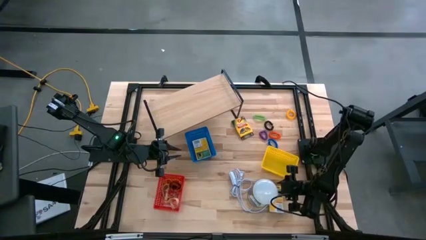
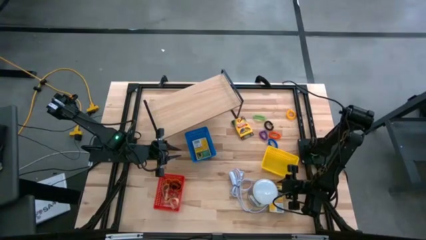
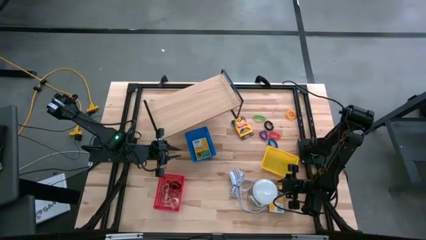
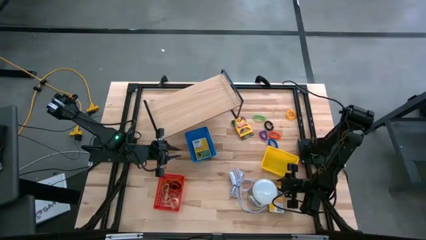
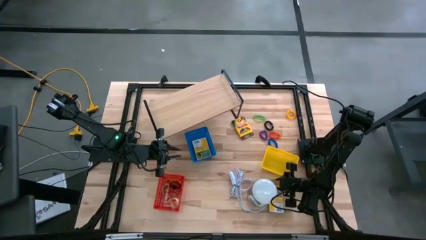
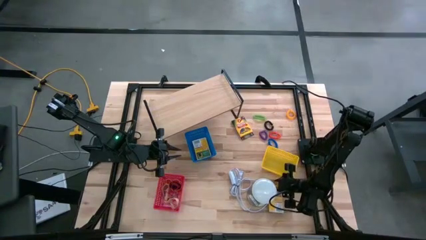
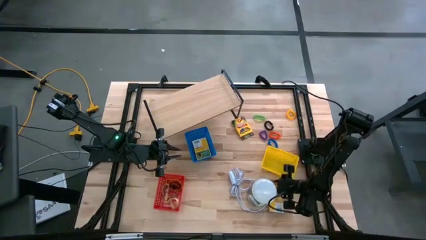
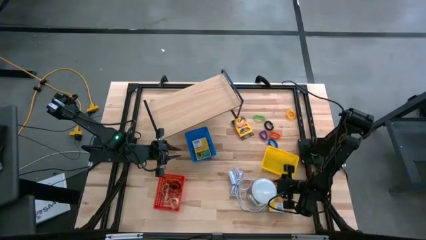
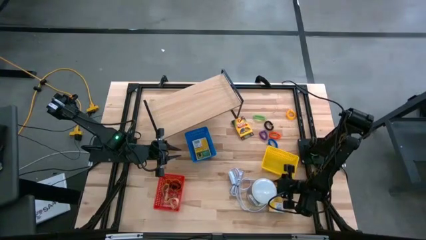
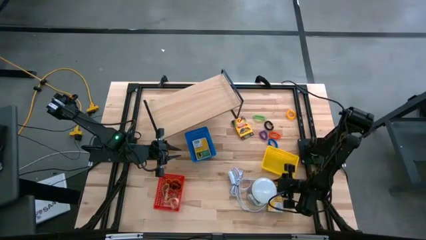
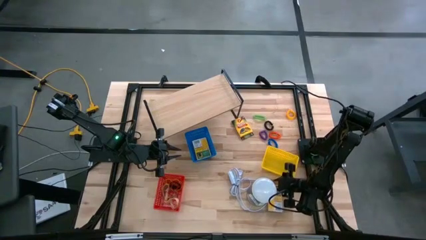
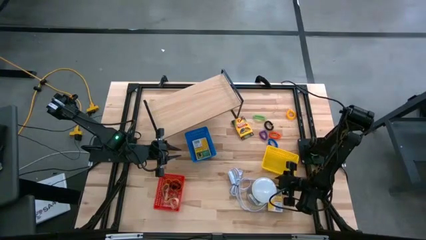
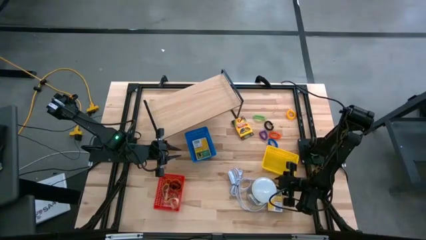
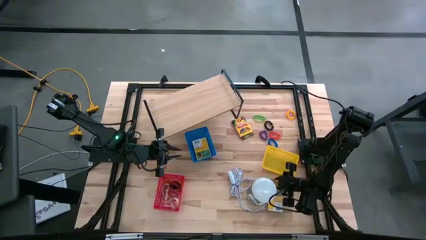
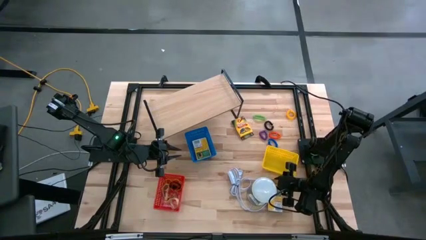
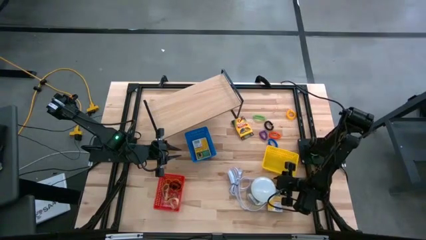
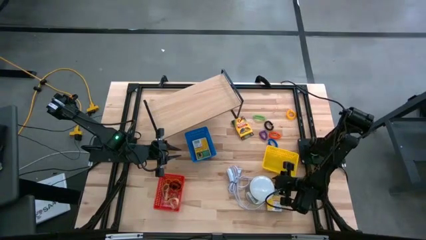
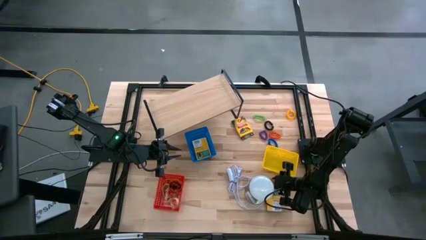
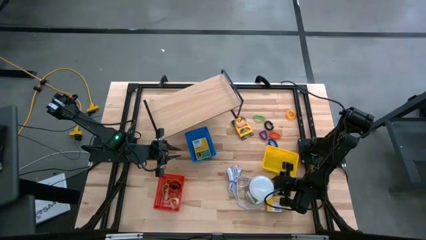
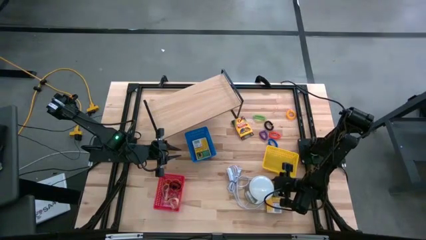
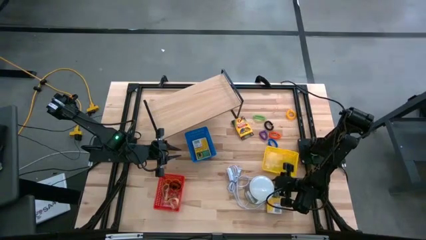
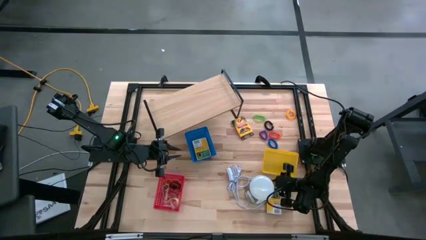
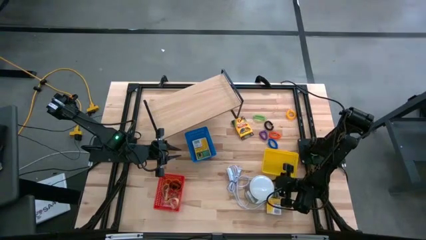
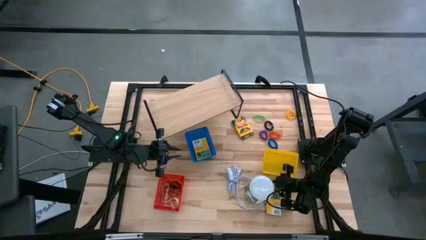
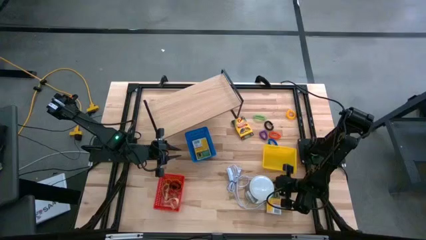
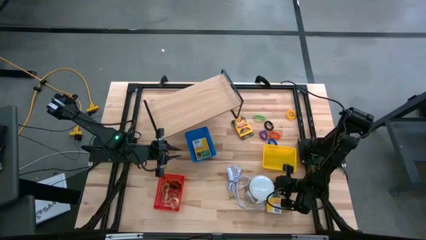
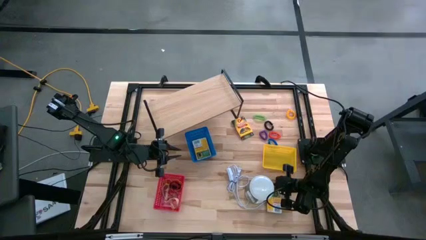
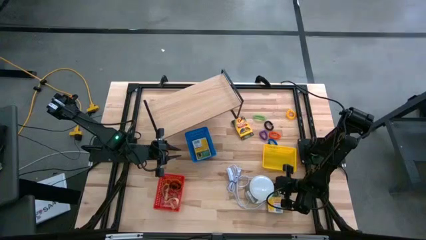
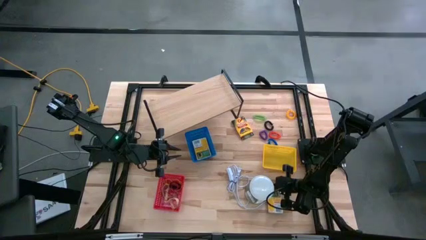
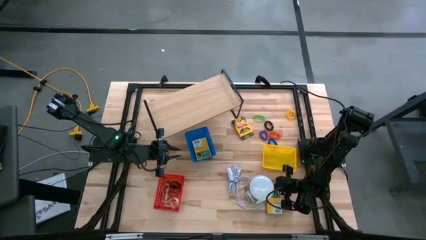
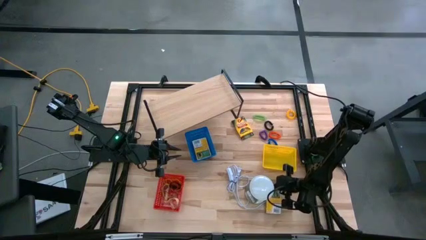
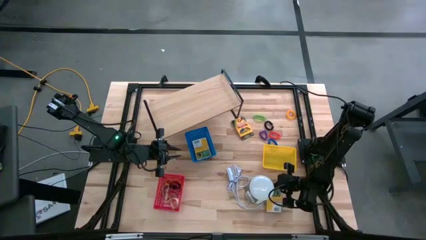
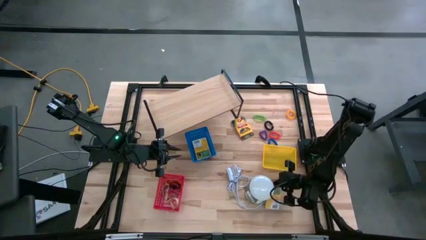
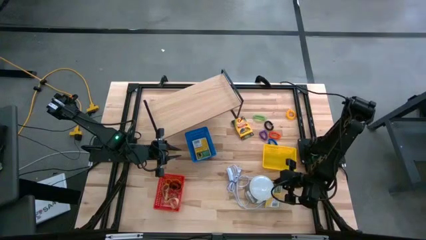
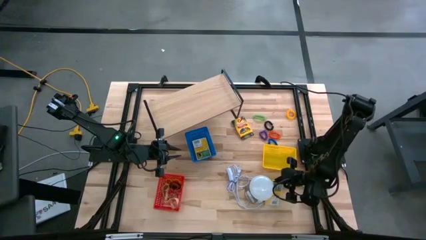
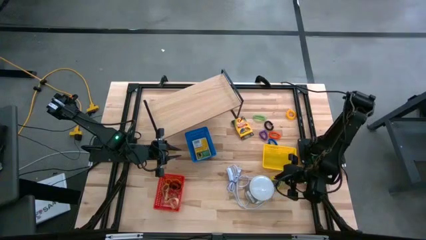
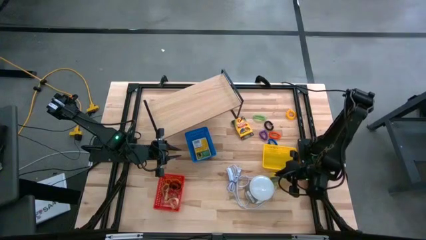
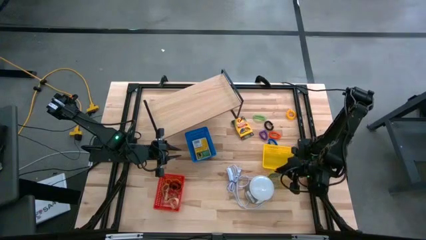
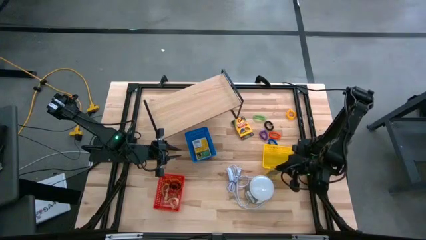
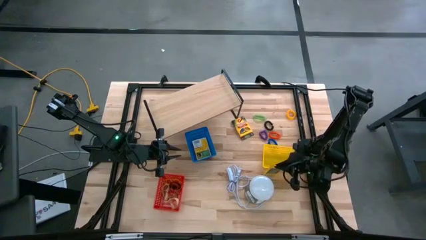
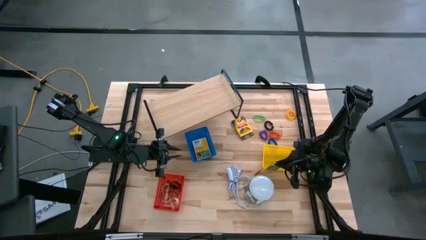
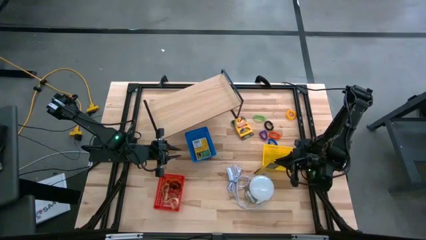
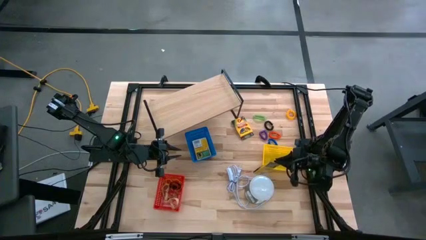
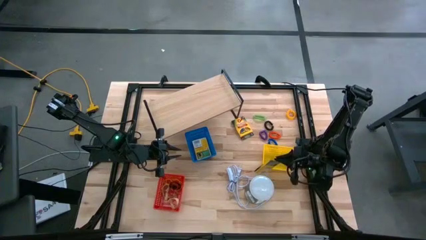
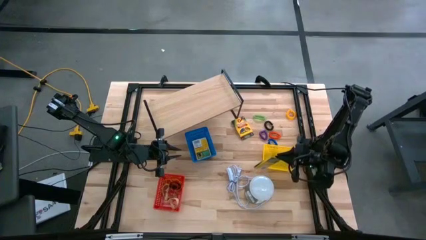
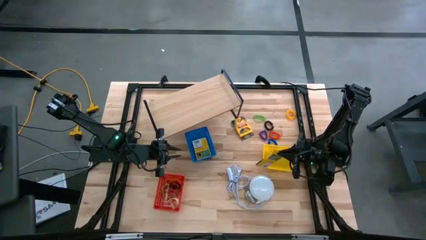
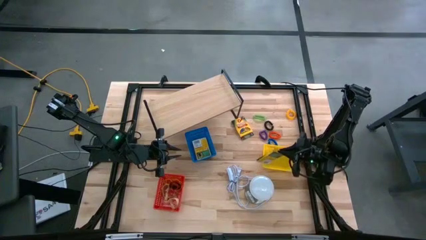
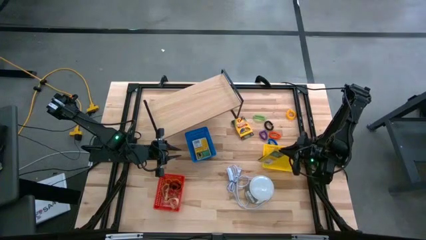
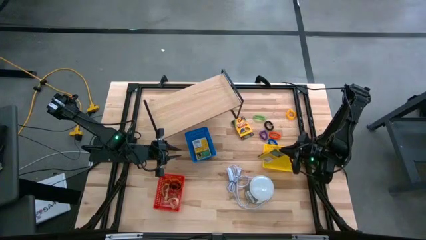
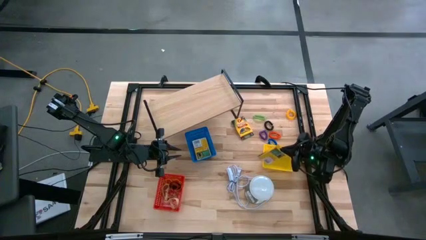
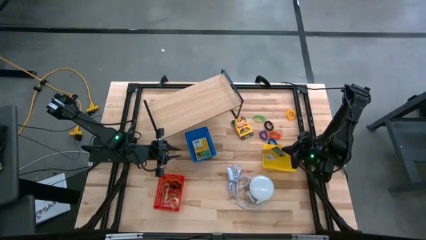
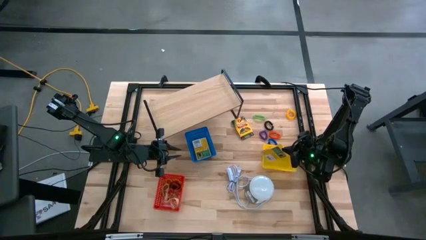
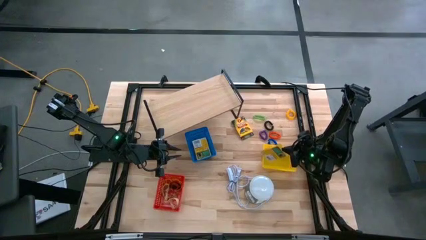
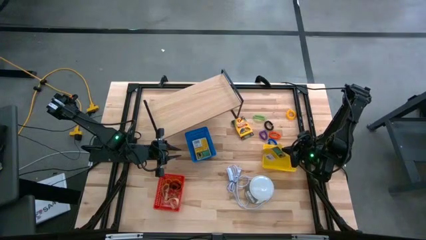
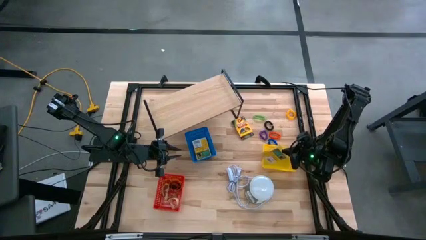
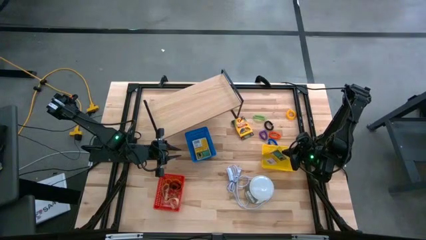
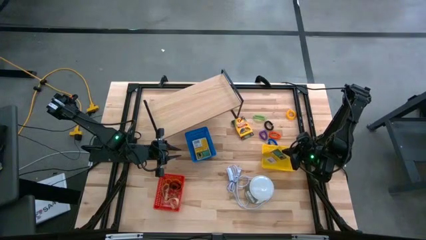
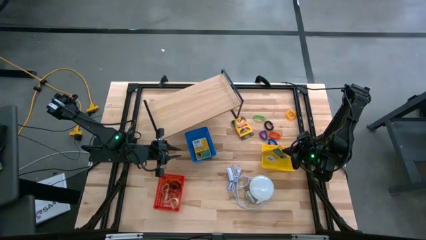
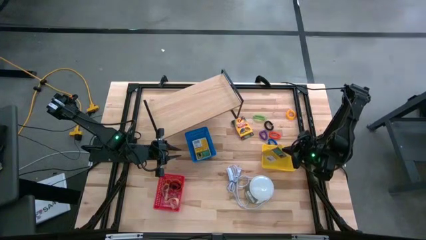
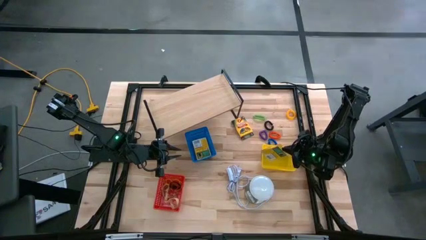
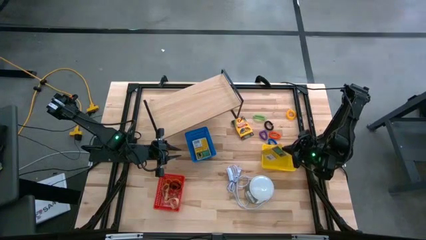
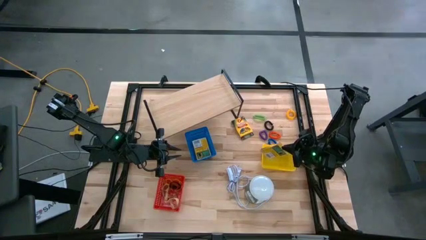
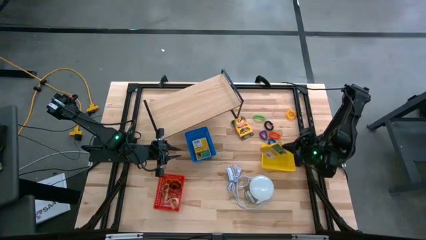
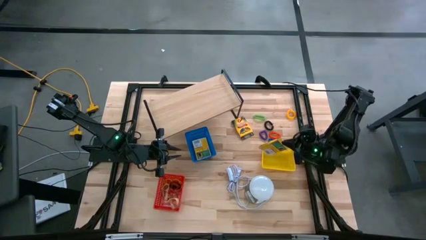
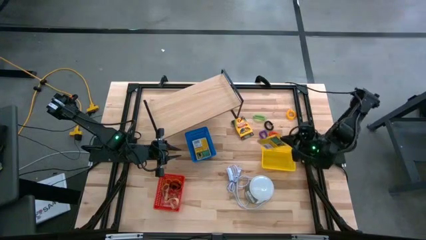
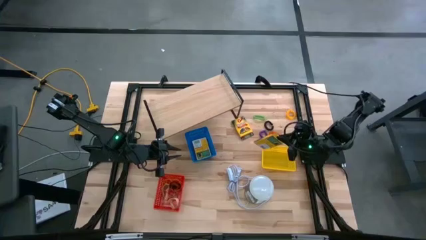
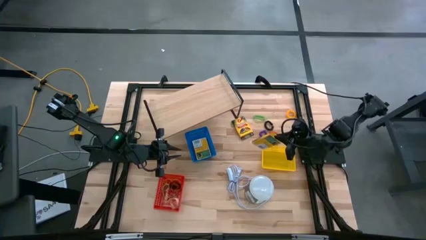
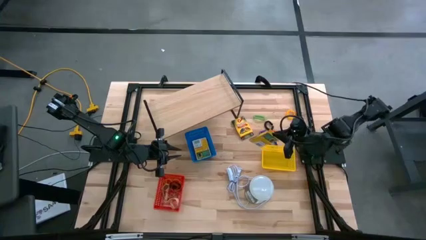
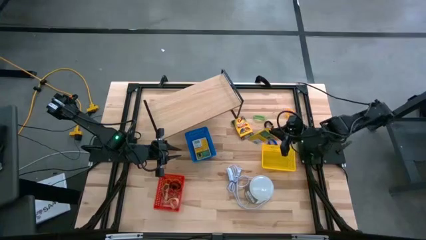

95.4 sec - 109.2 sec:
Task: Pick & Place Office Desk Supplies
Put the yellow pack of crayon into the blue bin

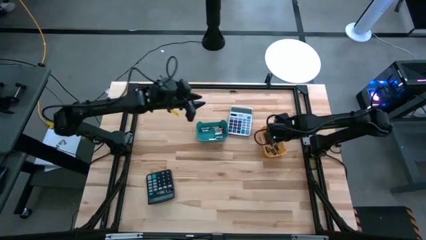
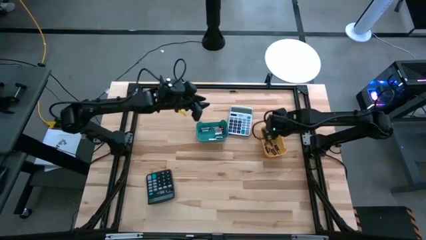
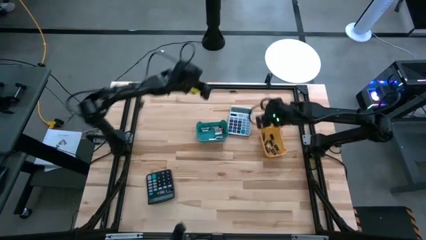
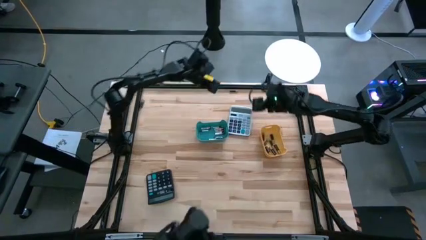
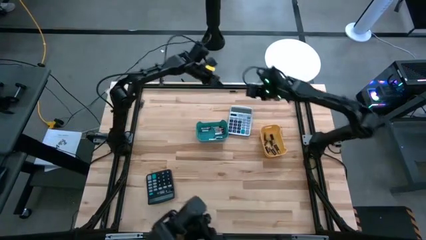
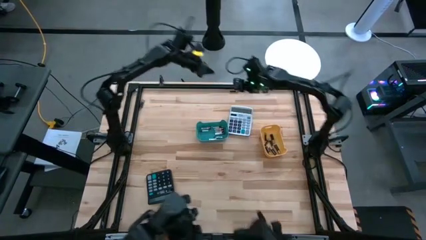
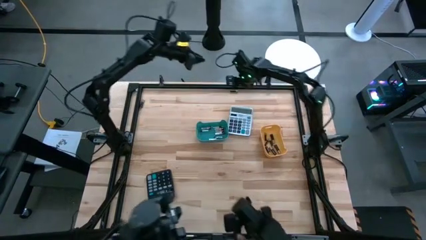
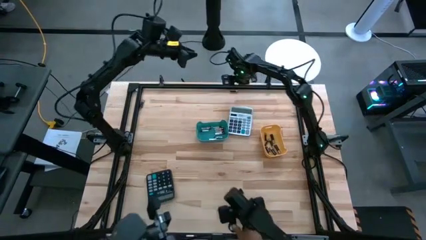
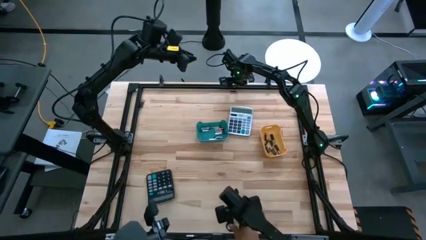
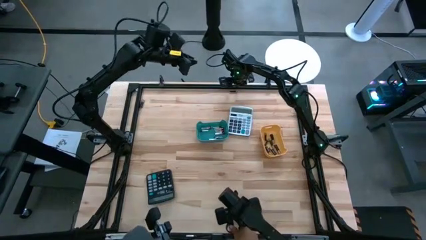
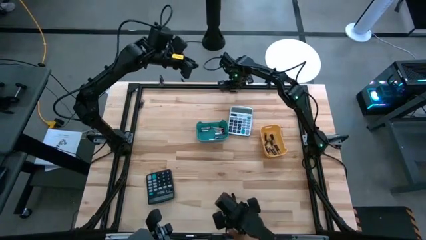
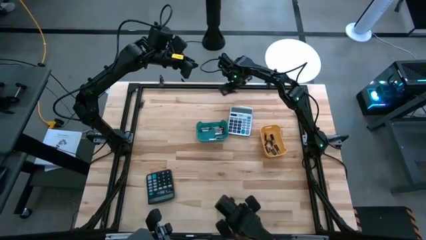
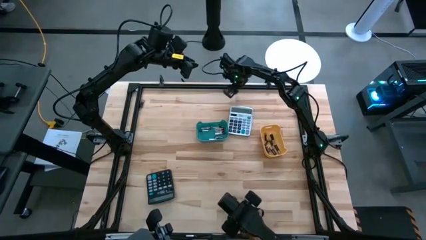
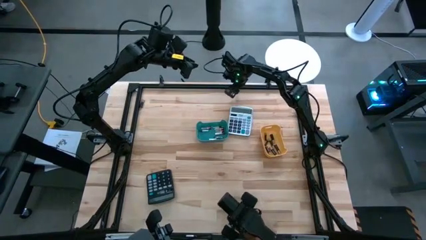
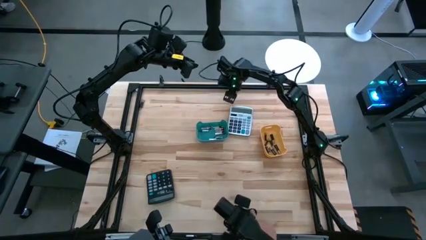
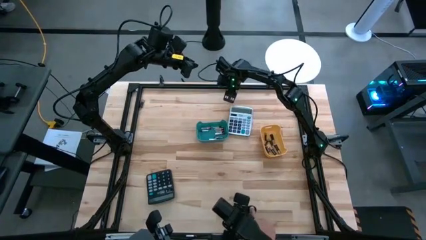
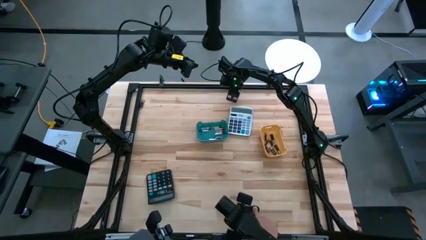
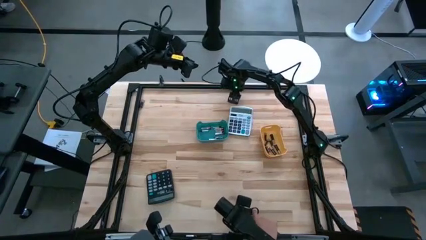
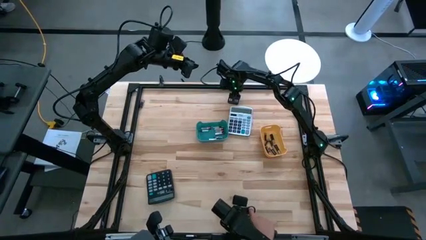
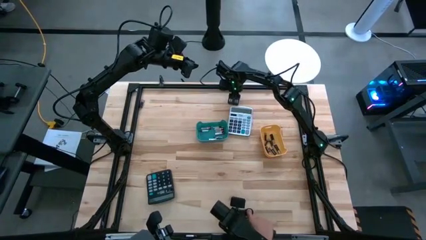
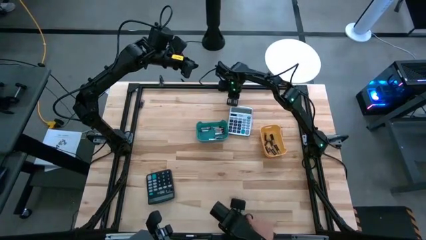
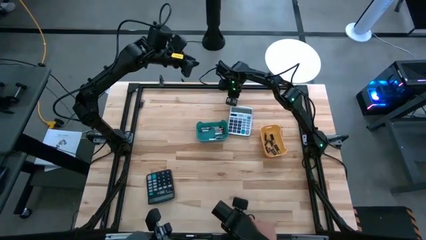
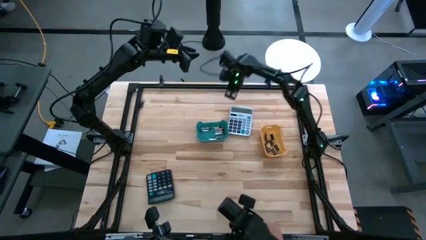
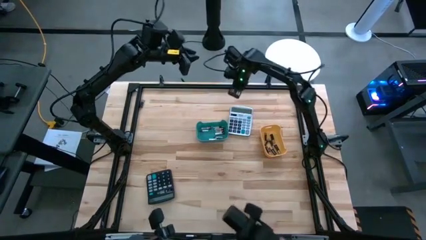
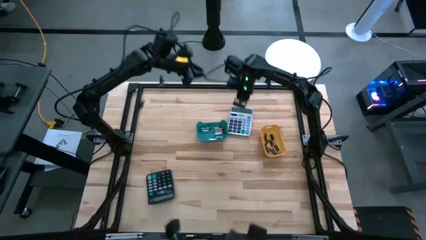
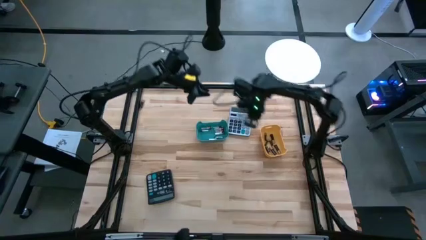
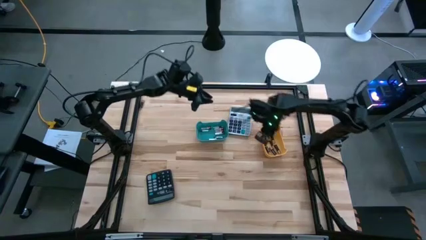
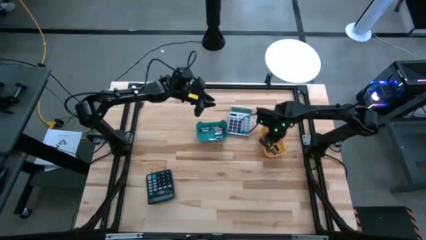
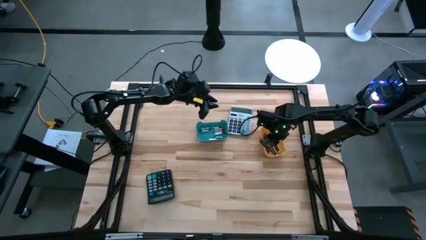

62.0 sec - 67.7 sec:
Task: Sort batteries
Put the black battery into the yellow bin
